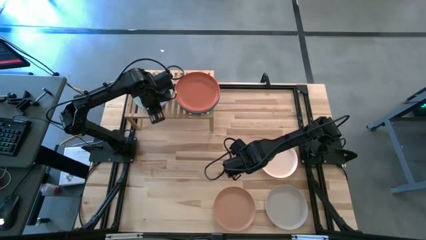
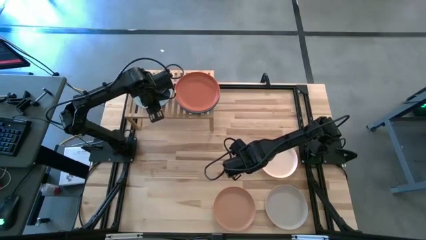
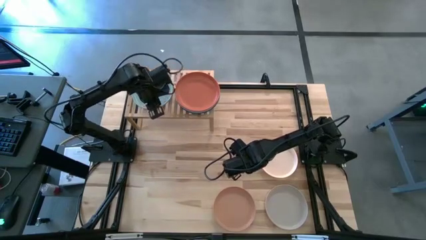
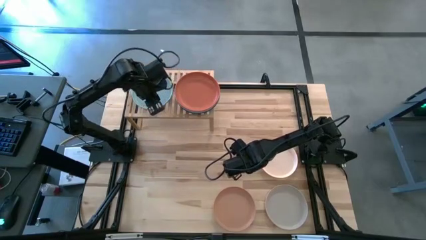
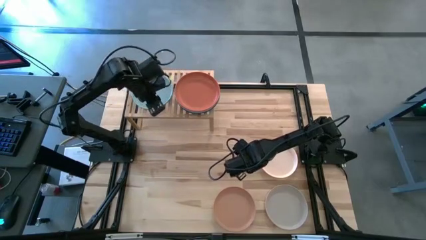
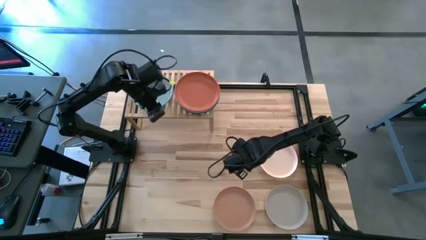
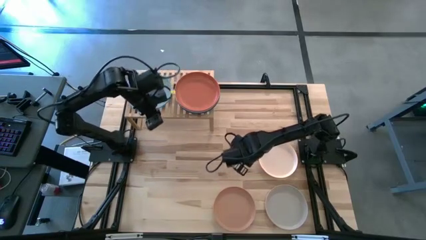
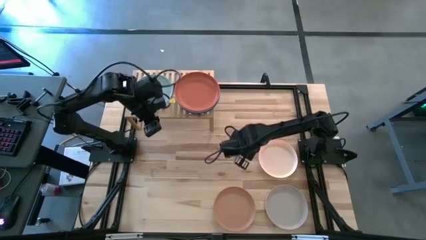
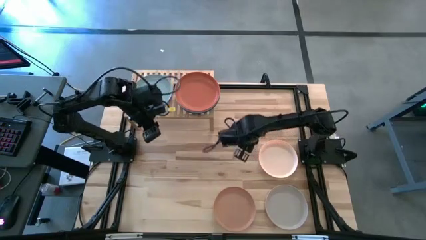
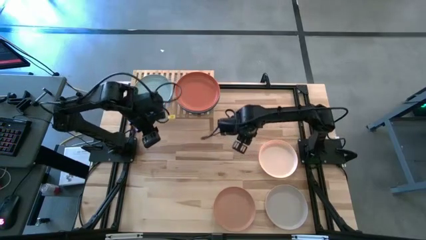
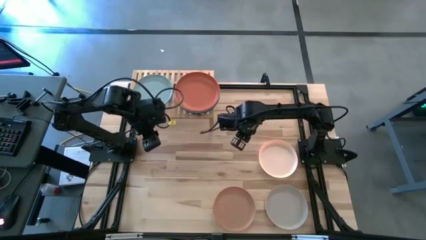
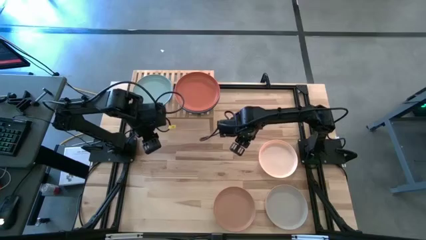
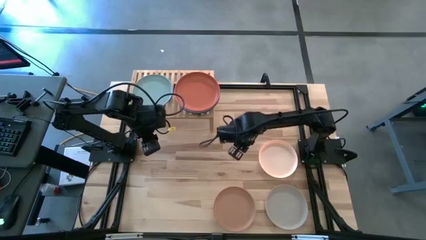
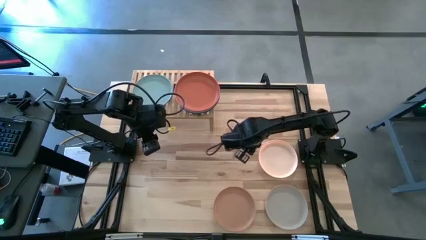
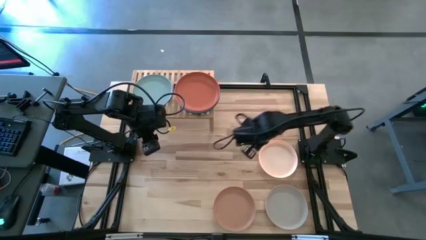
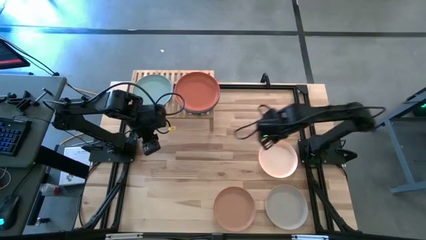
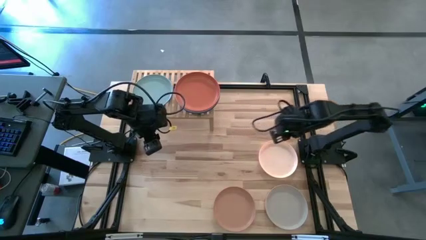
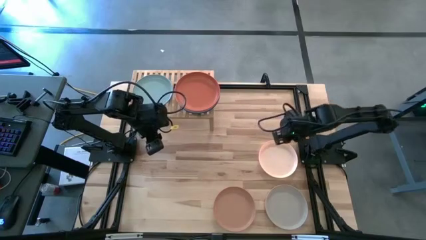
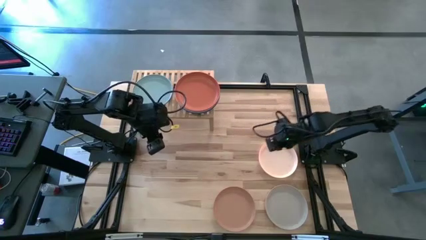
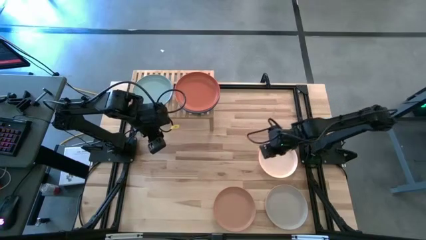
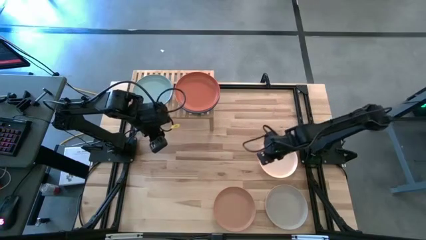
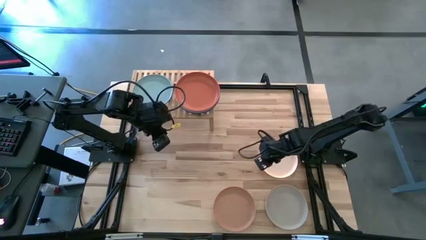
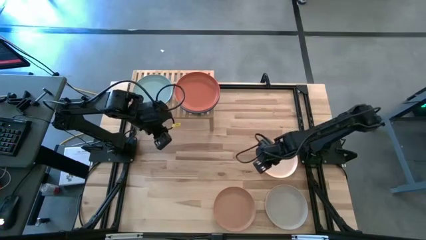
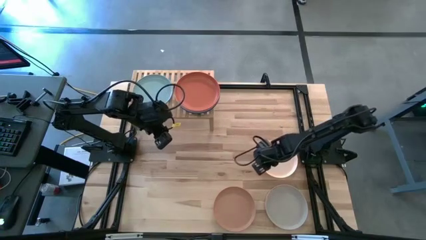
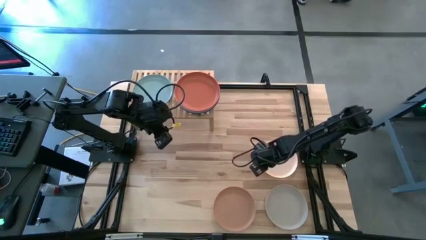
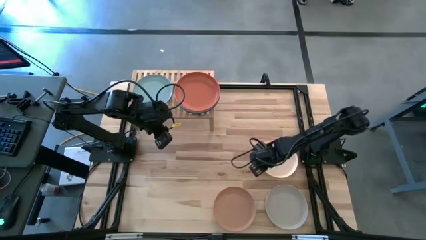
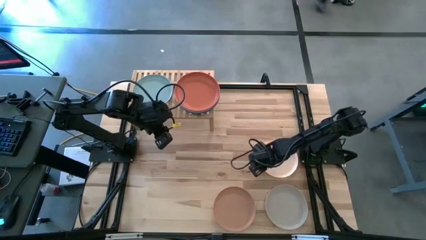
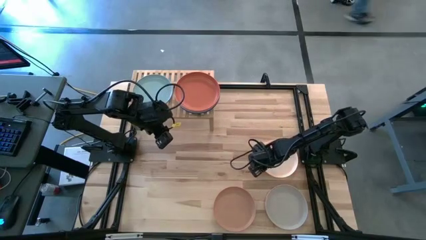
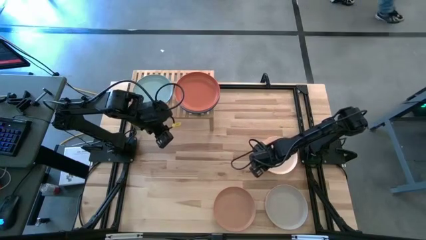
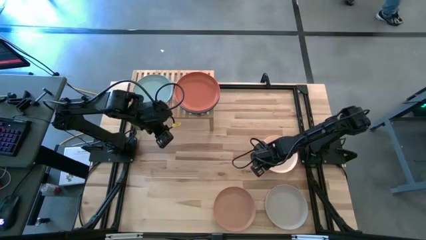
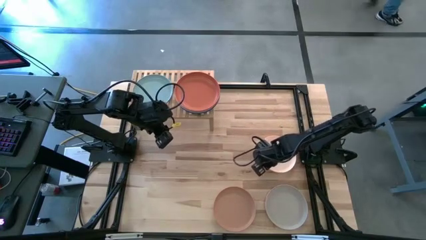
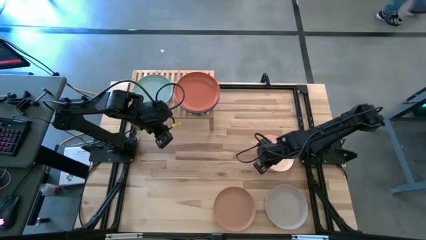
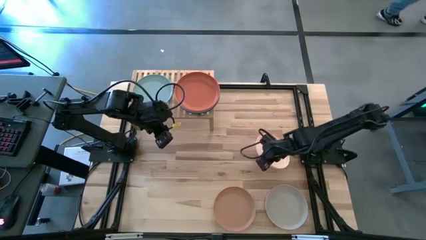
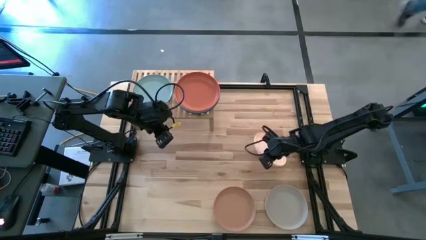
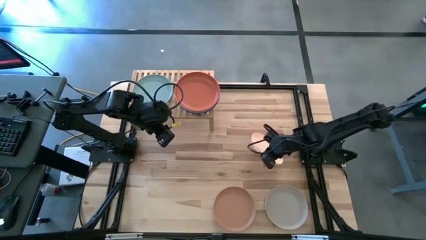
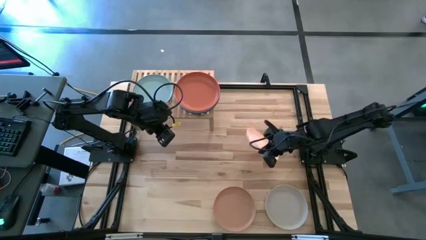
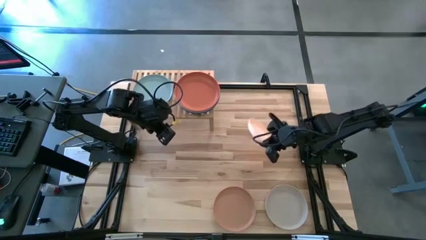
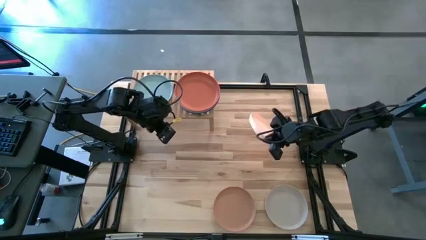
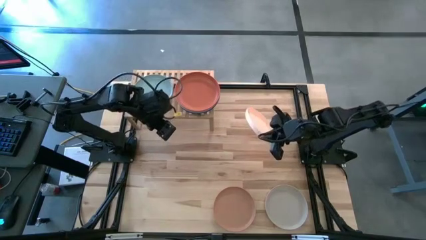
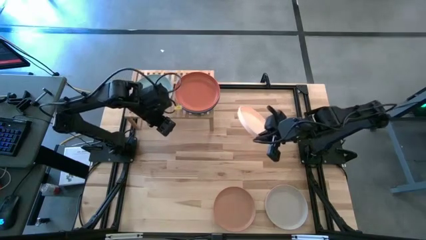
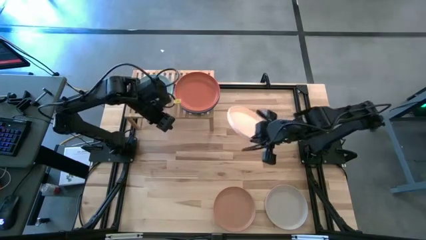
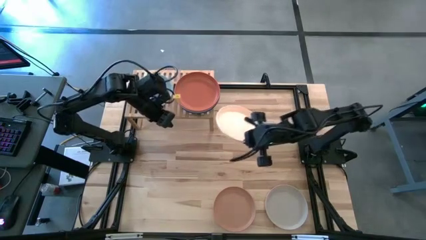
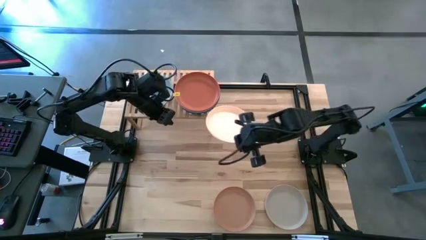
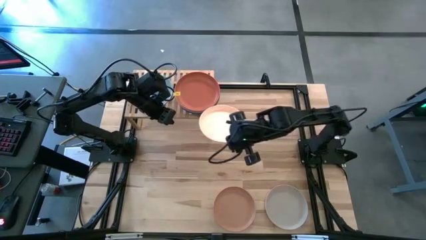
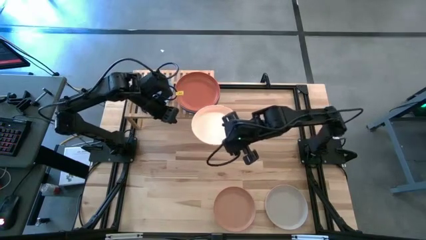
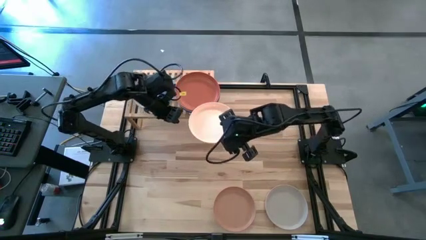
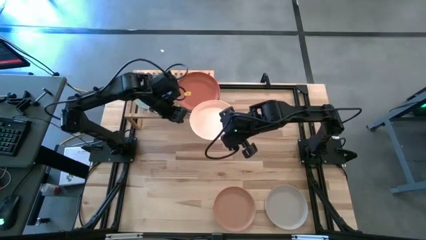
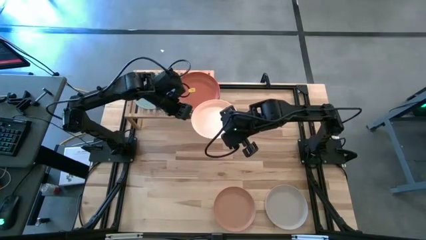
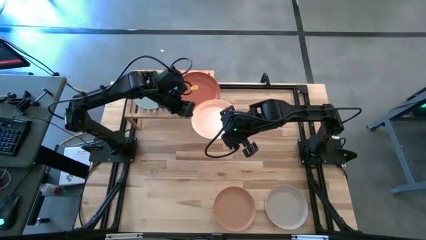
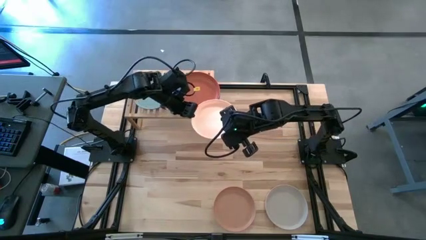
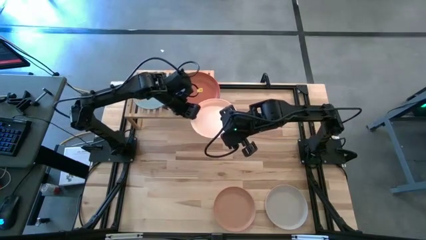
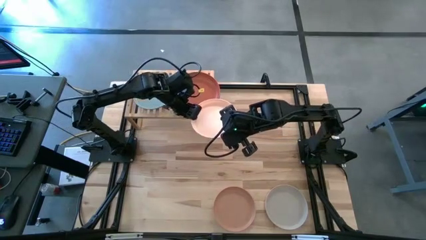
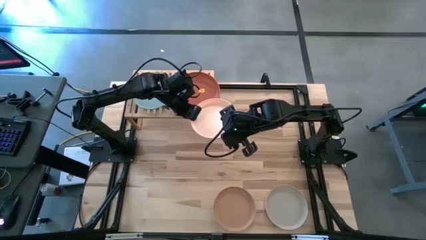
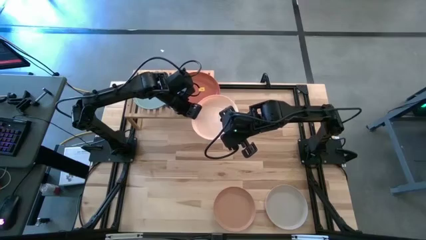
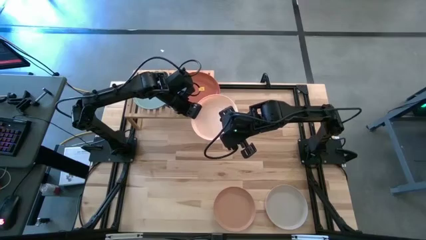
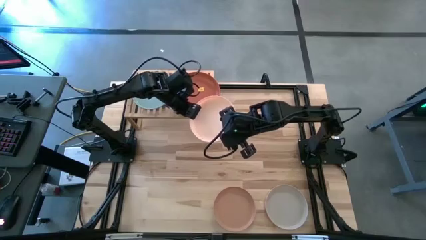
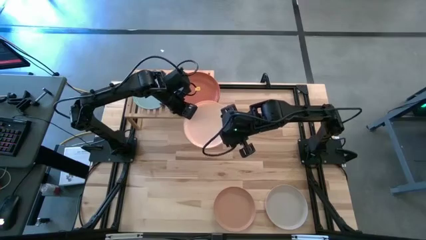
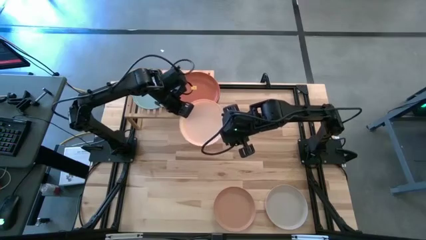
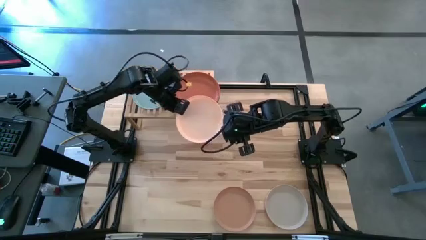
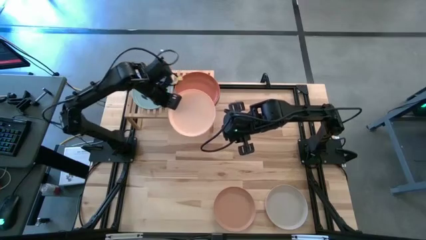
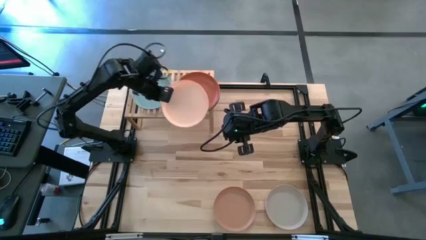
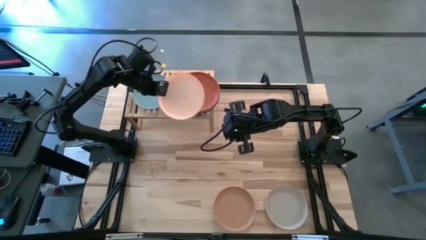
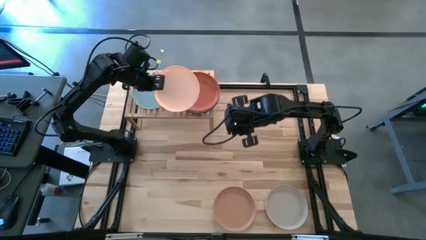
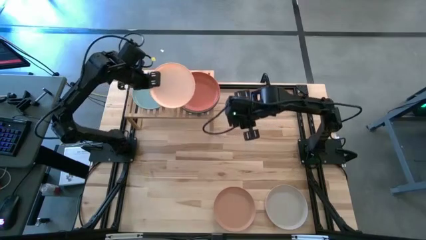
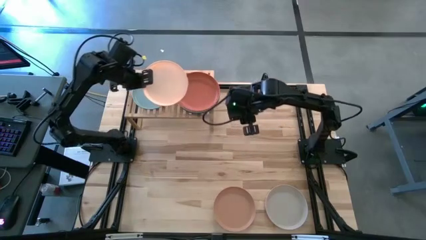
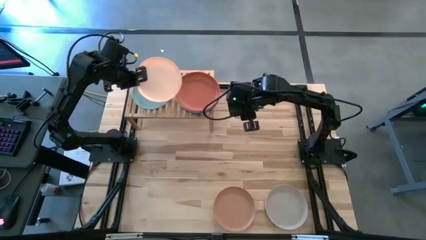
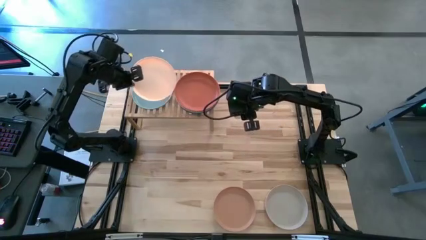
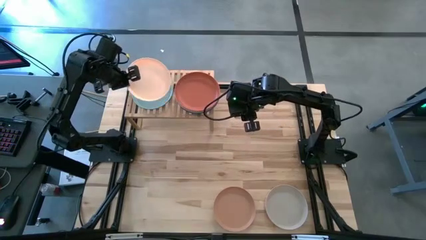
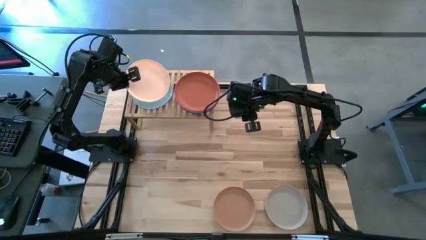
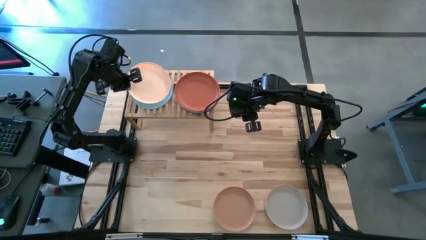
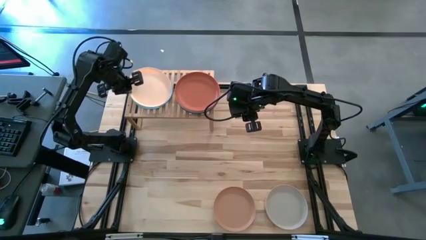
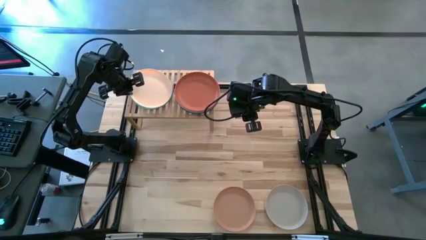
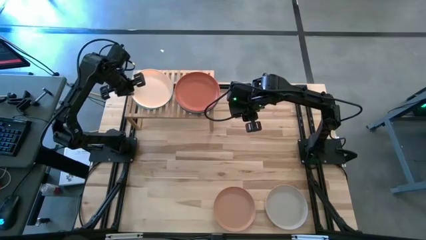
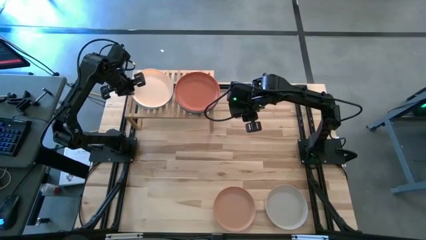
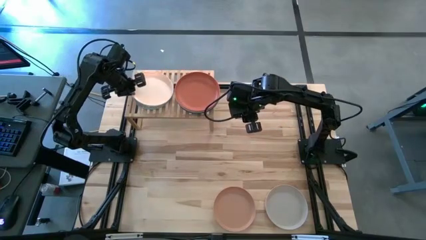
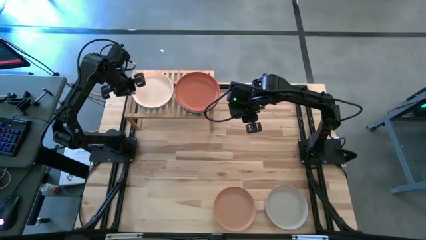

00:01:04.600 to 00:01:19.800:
Task: Place and stack plates onto a shelf
Stack the light orange plate on top of the light green plate on the shelf
